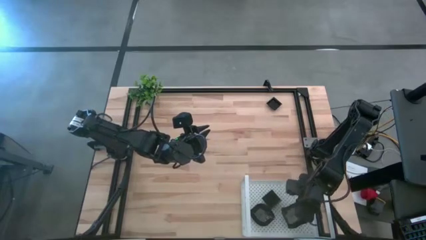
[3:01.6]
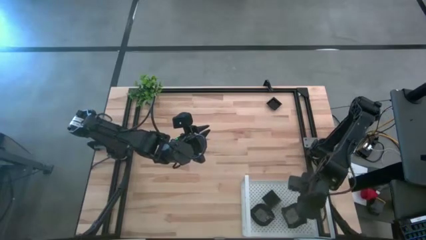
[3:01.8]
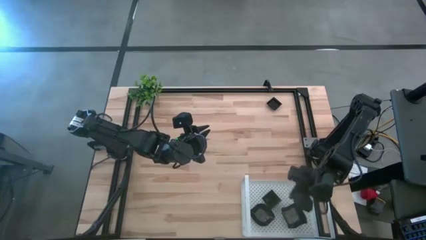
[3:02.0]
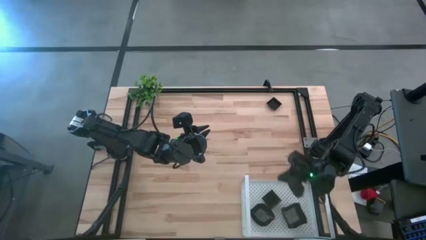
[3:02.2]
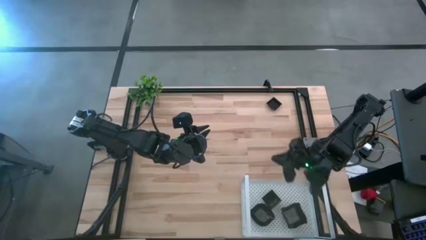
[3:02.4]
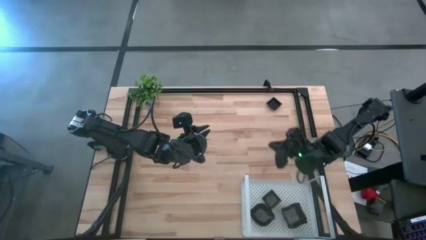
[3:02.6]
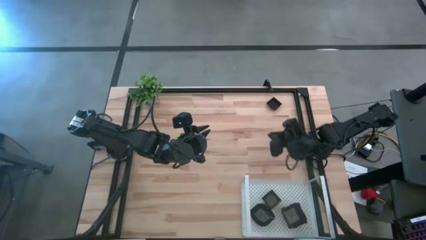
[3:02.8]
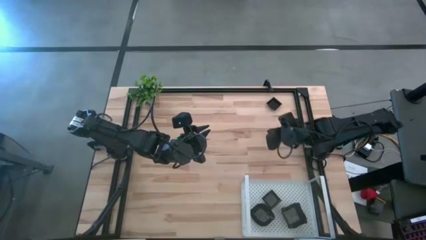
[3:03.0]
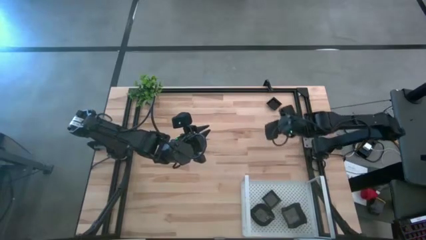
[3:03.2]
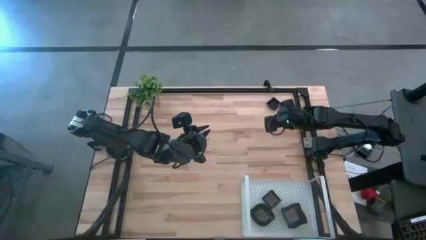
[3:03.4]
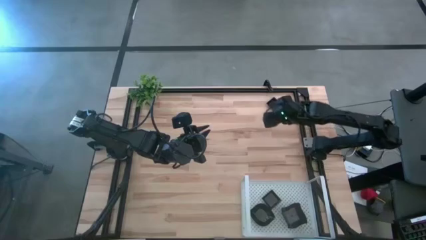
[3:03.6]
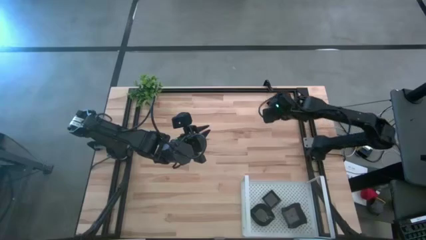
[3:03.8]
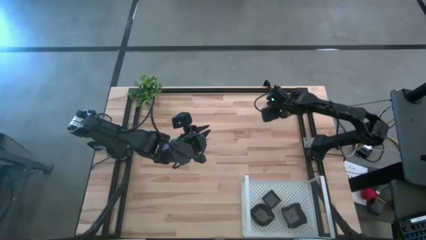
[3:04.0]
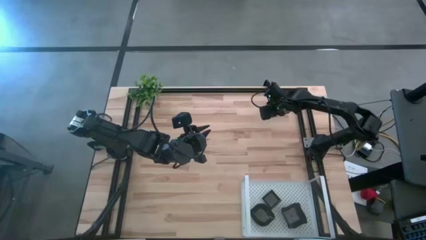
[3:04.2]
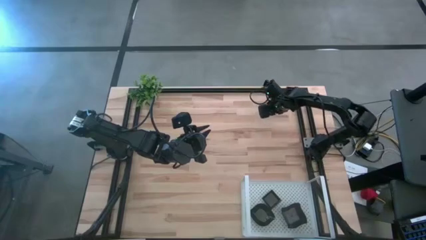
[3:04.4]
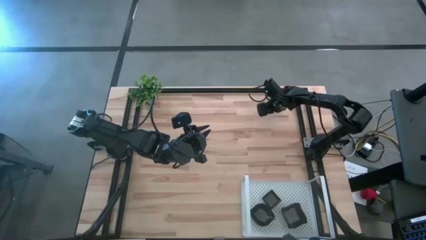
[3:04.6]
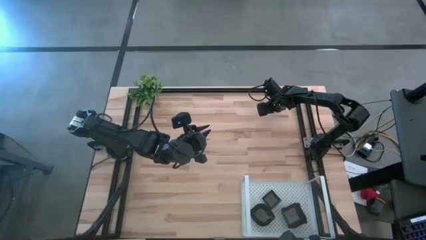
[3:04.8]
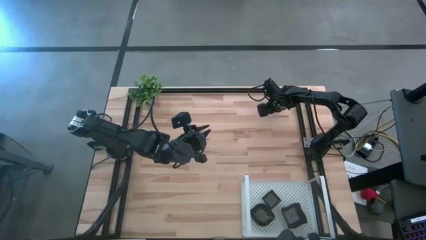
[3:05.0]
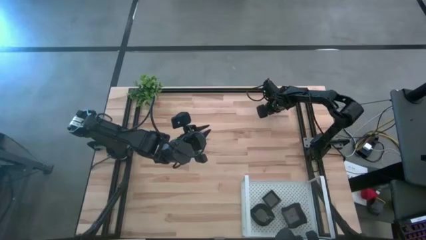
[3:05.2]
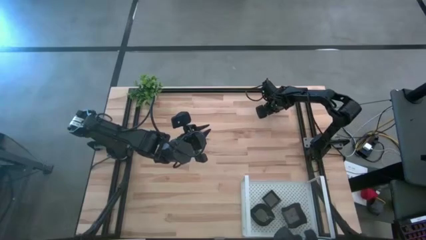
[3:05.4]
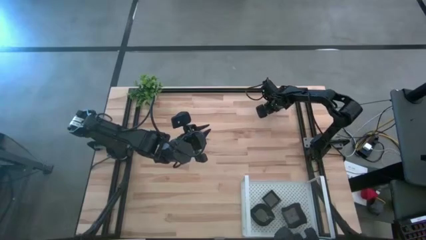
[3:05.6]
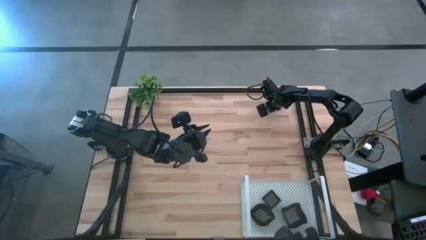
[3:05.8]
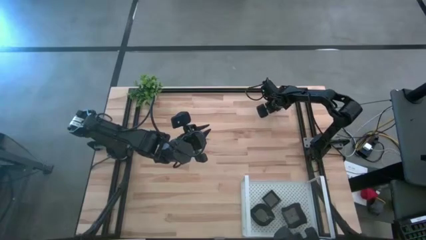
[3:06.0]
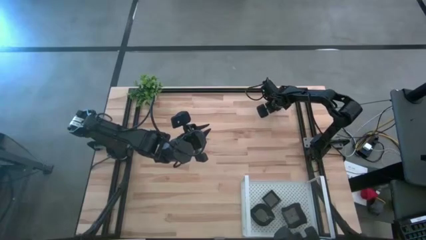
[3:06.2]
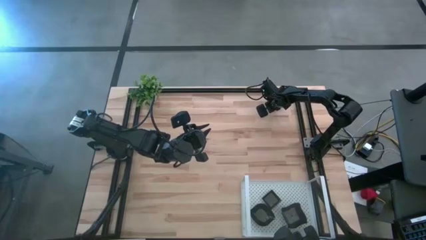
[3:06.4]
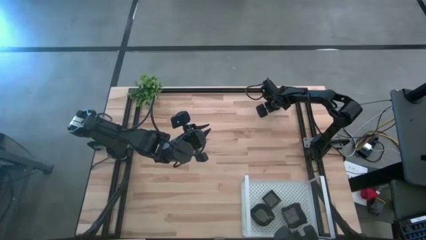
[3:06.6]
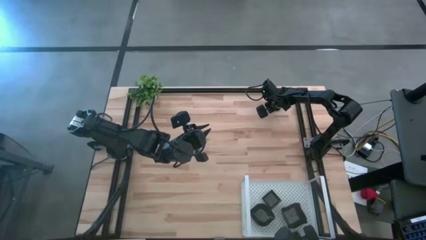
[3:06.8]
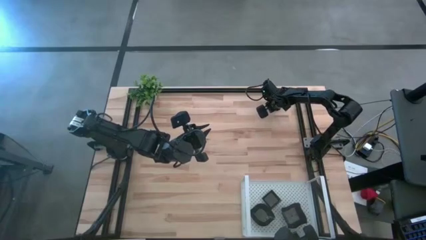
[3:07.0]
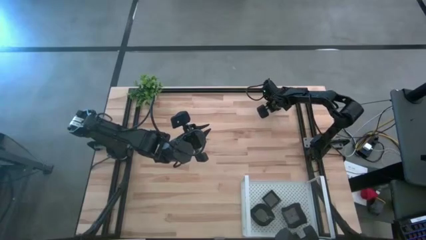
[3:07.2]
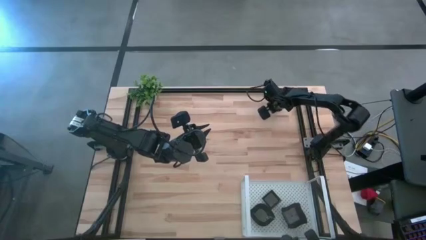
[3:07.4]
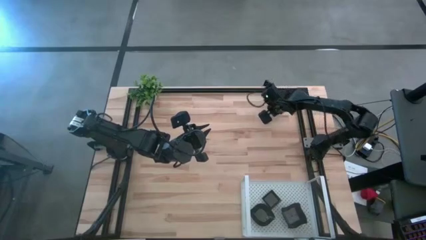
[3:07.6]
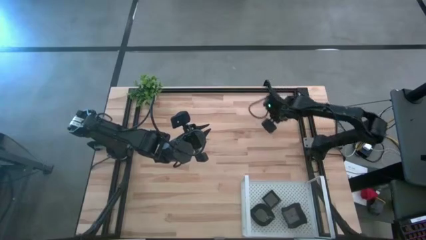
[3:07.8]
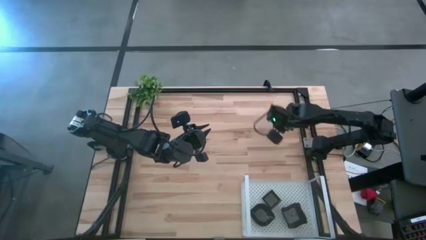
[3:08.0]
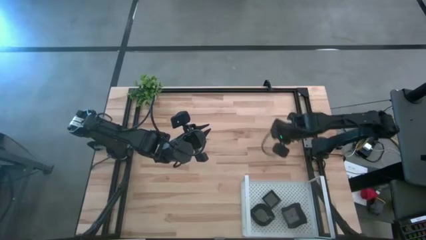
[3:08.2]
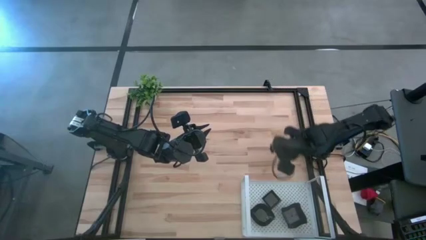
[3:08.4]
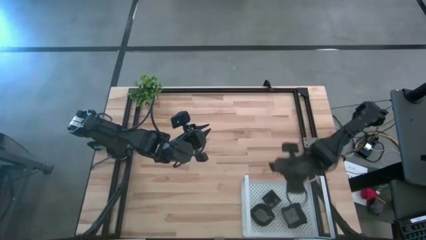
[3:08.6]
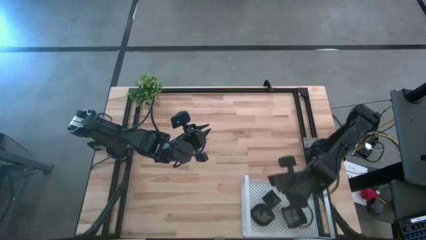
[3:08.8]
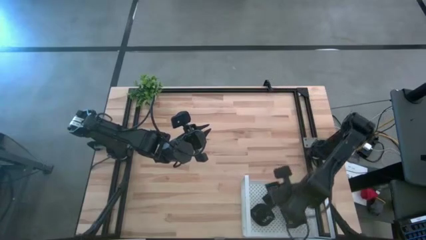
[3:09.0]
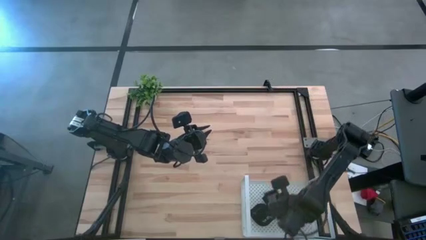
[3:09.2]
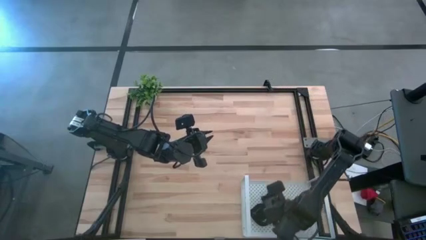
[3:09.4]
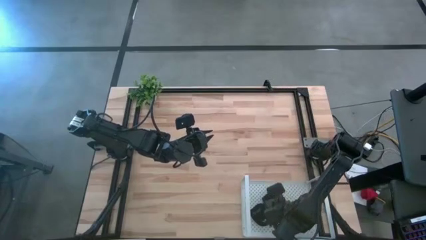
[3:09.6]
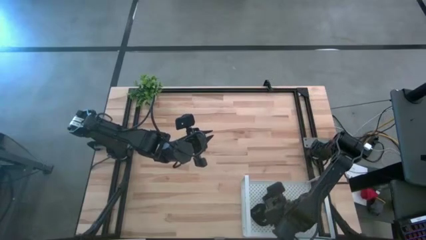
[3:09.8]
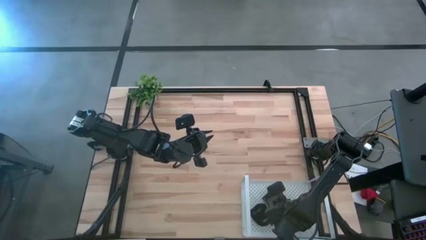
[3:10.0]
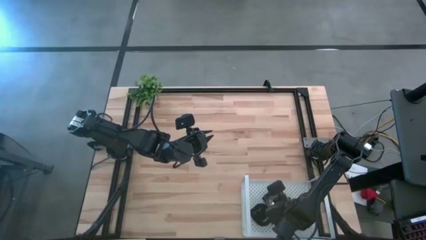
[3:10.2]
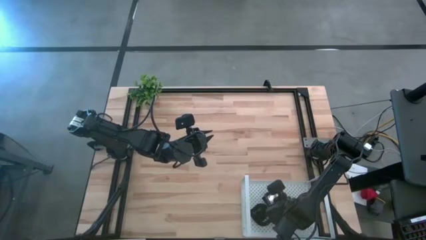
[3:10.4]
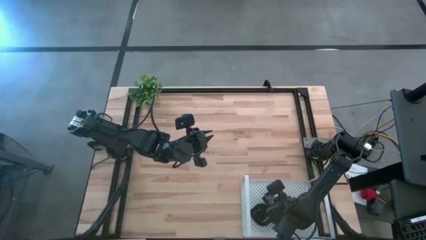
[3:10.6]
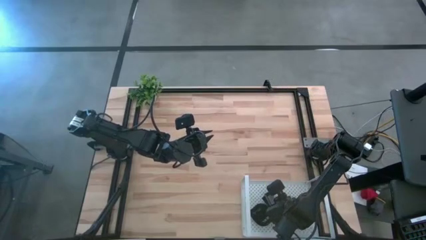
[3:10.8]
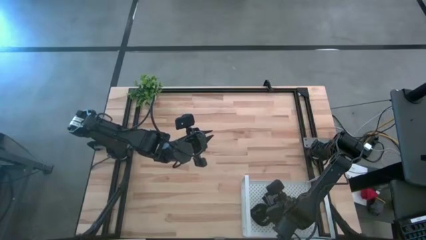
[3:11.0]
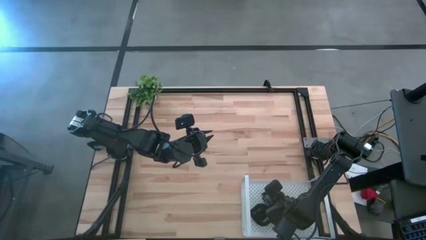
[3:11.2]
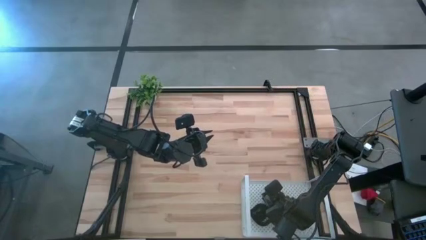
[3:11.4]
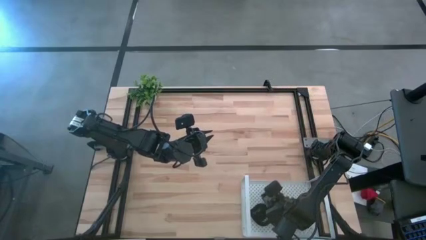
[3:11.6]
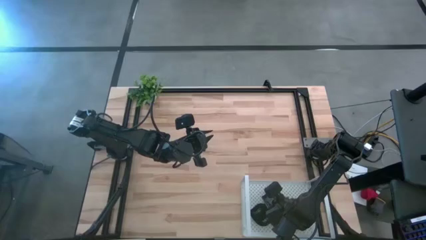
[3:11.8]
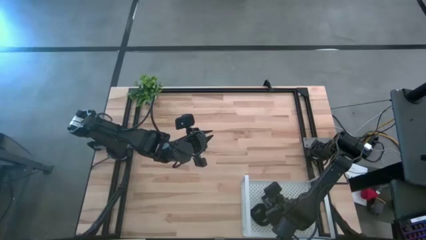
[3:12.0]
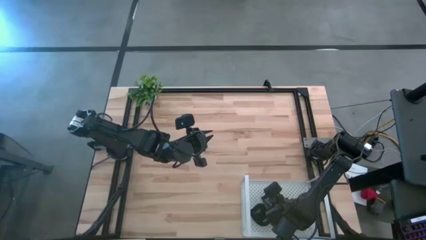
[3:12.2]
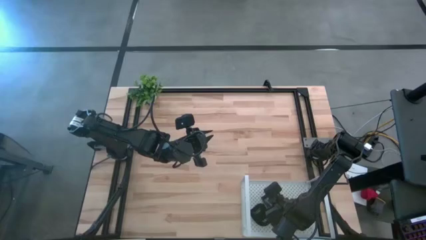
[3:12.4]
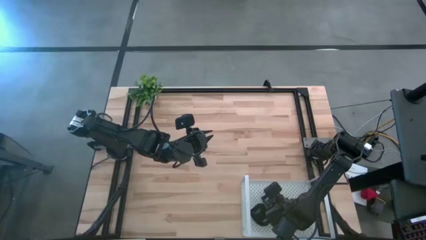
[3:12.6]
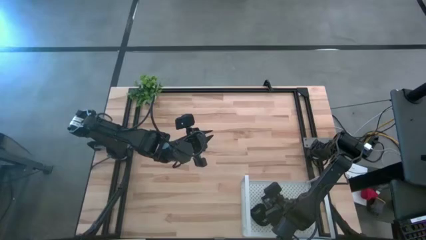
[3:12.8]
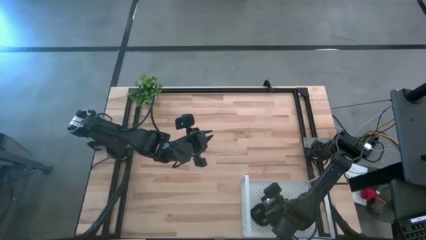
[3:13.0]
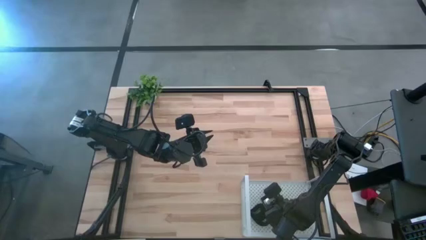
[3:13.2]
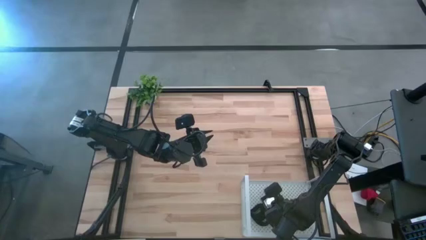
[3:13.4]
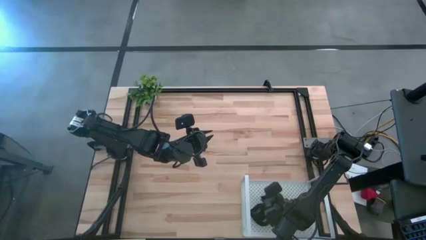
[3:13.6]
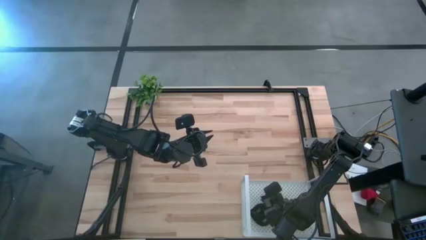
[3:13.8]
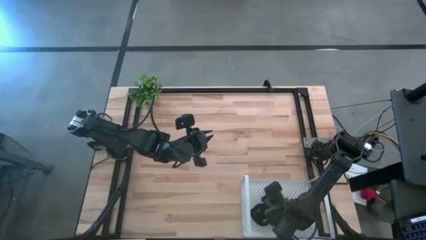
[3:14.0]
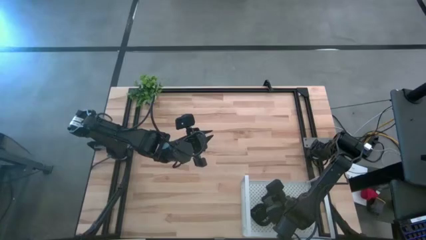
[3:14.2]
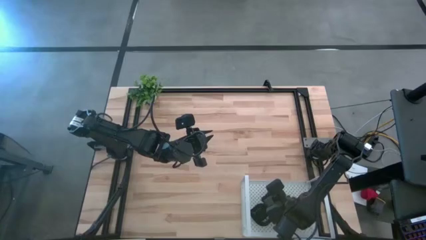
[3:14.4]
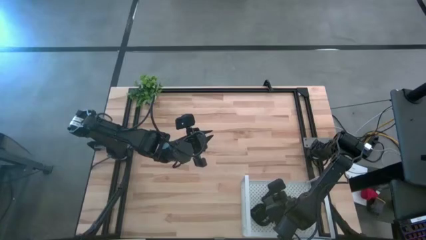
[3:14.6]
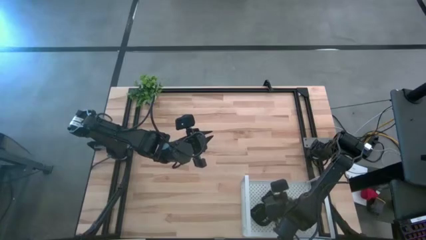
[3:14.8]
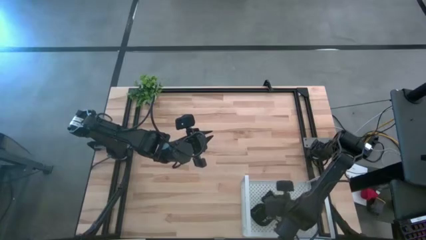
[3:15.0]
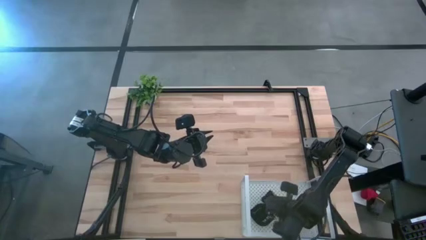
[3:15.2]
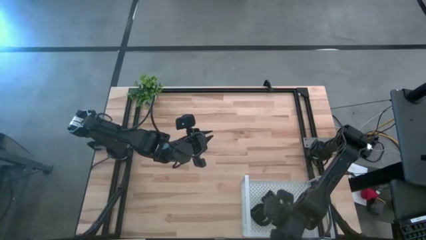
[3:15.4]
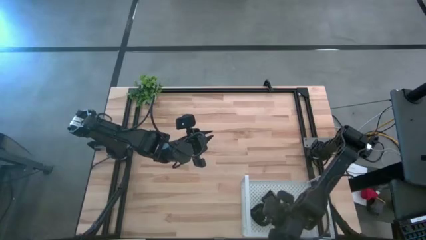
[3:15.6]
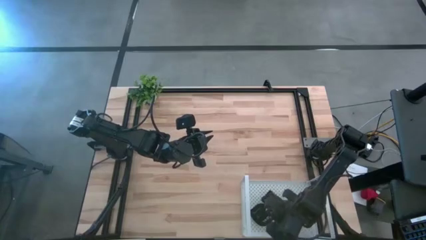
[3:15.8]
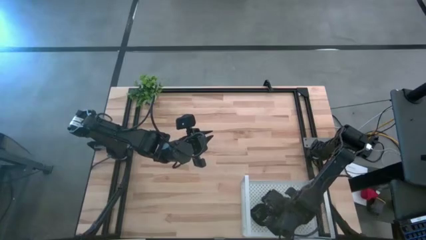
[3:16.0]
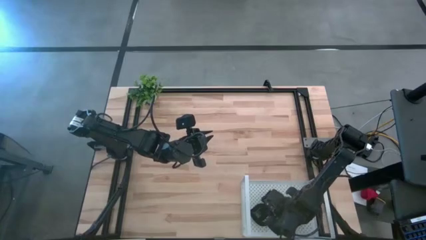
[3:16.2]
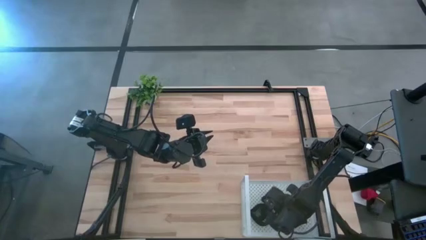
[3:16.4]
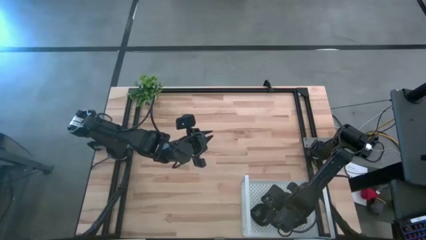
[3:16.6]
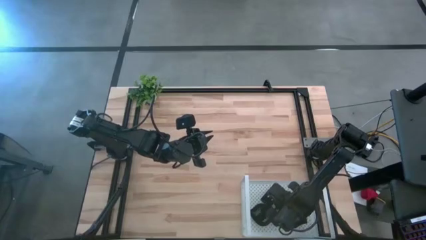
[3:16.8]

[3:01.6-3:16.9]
Task: Pick & Place Mini shaped plates
Stack the square plate into the top square plate on the shelf
